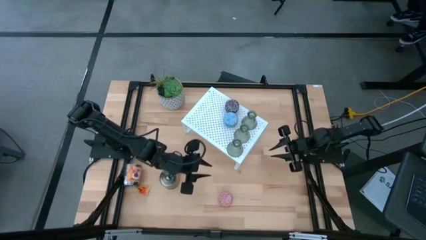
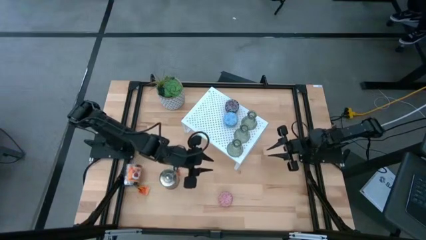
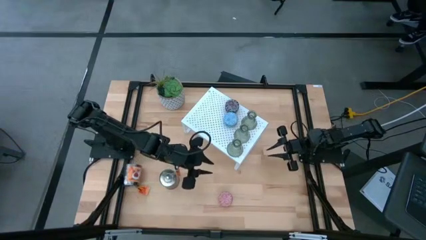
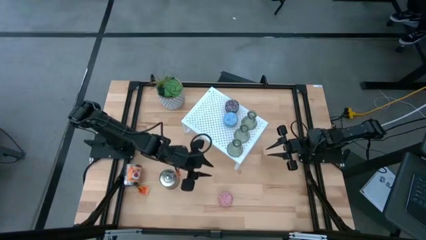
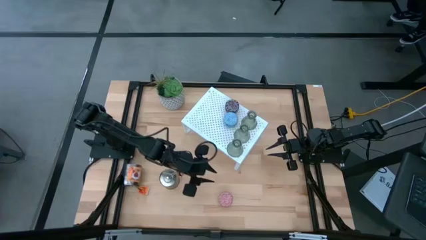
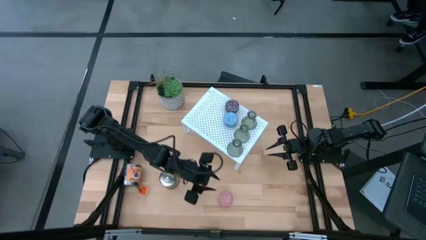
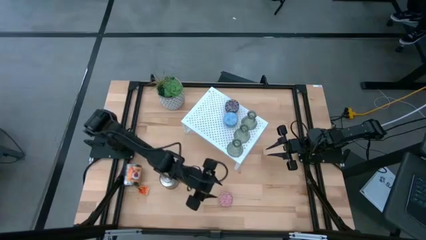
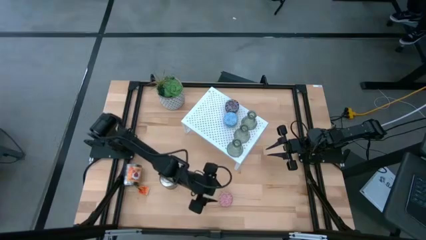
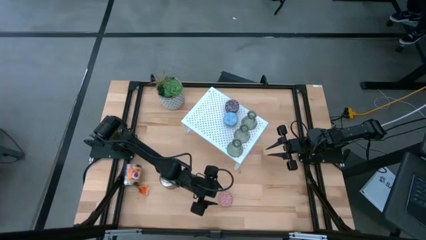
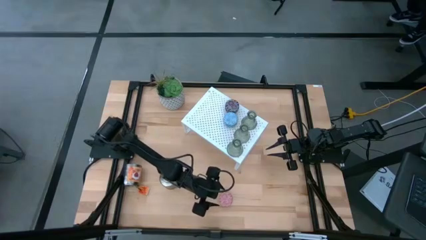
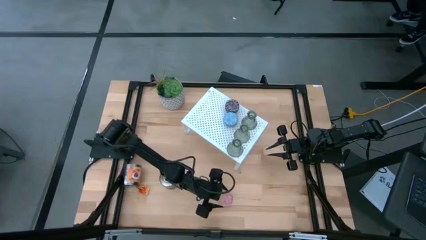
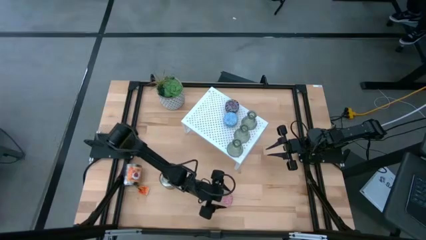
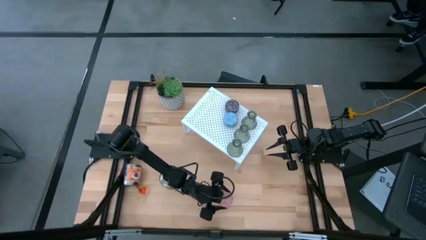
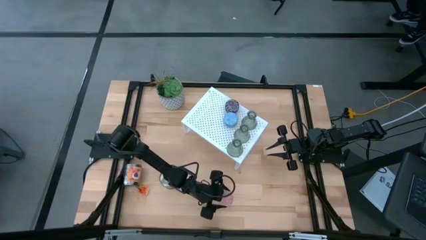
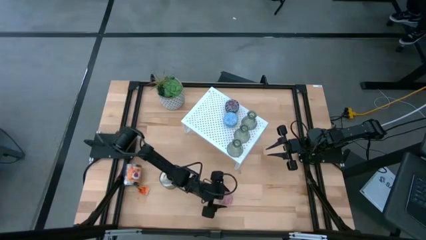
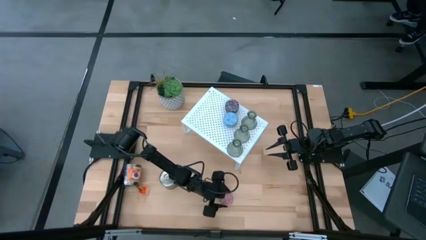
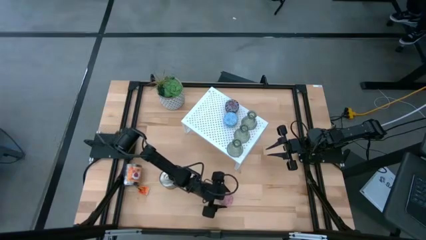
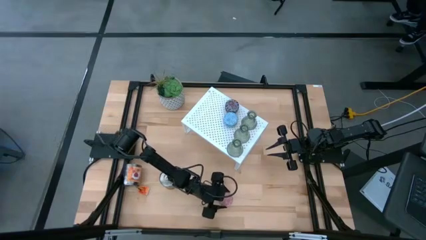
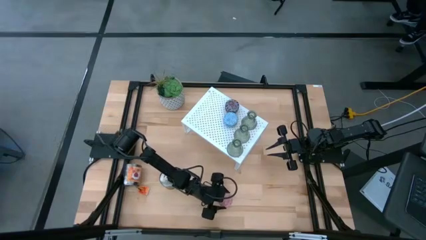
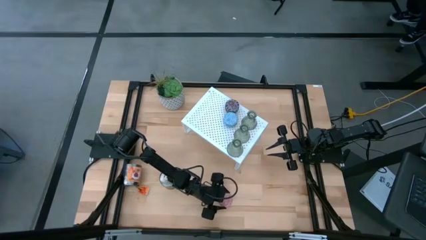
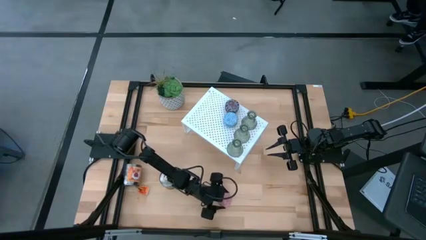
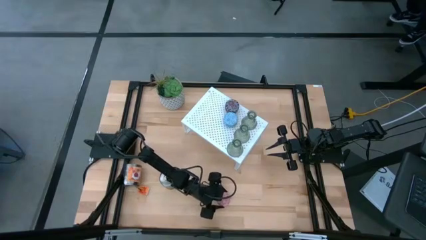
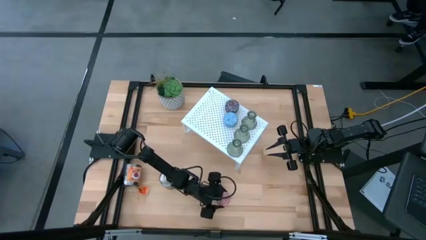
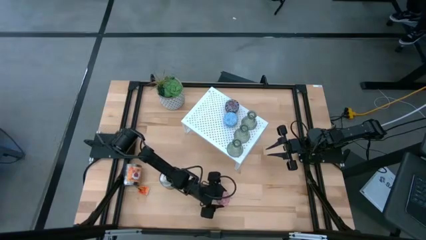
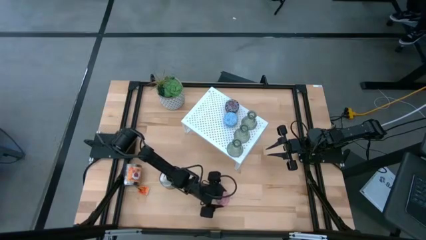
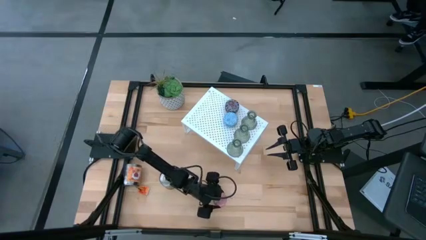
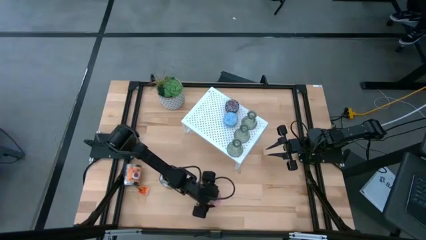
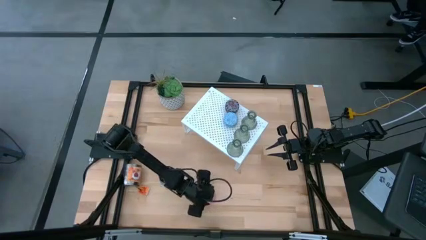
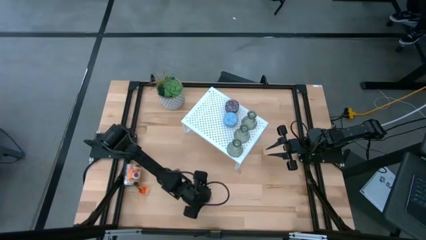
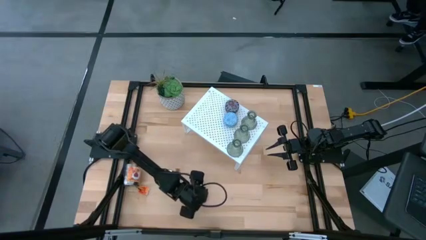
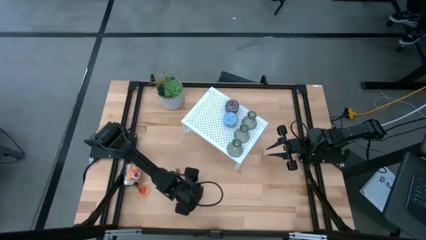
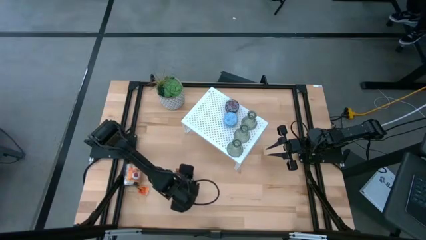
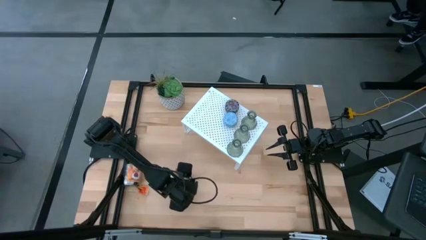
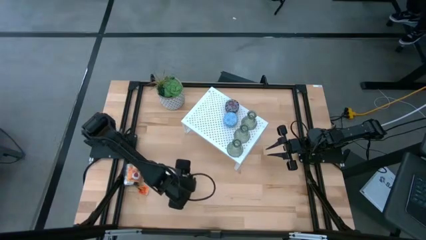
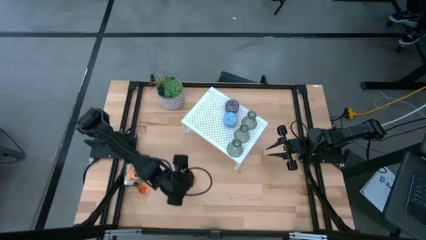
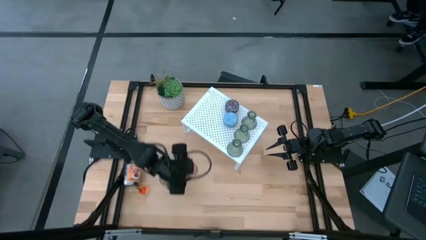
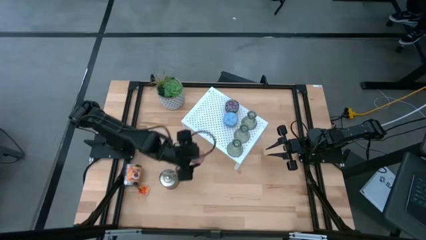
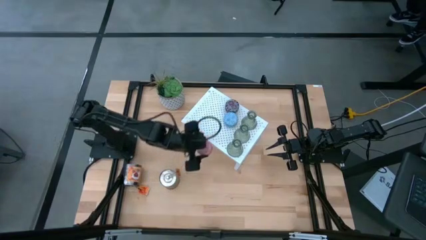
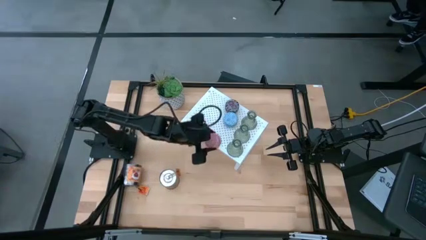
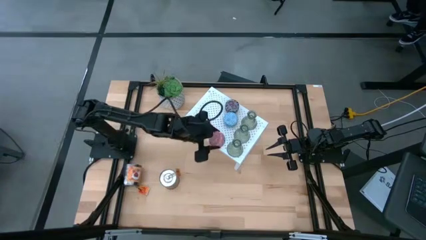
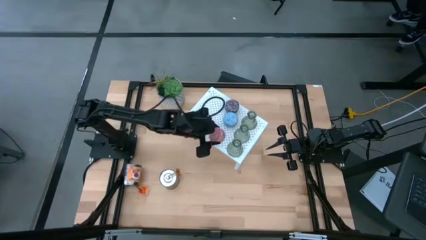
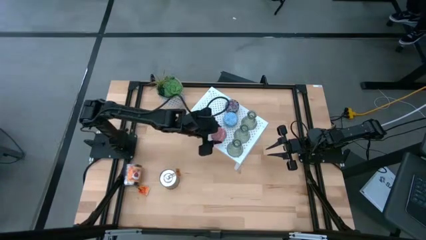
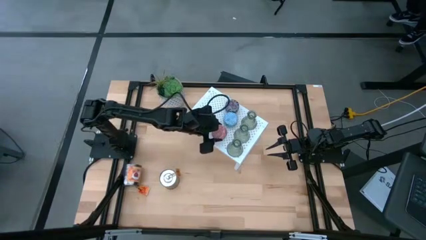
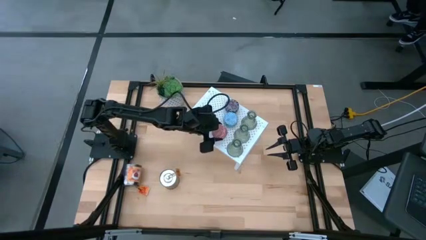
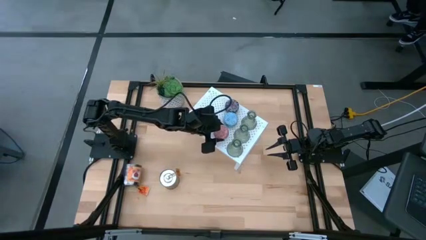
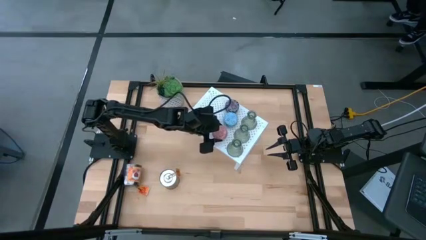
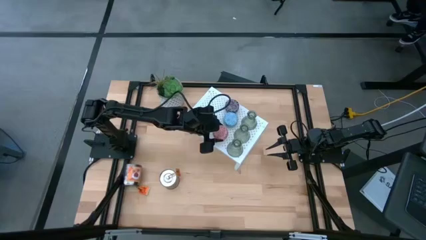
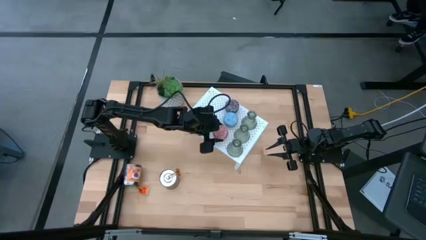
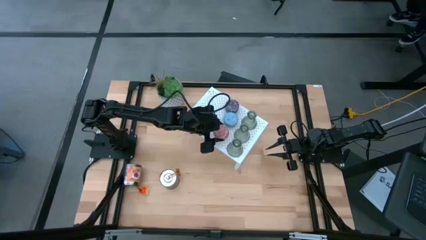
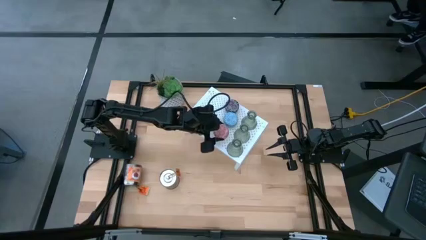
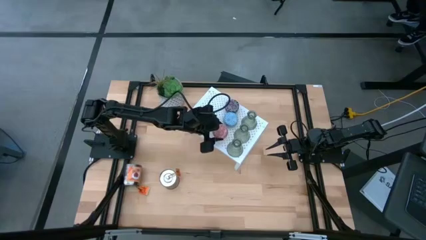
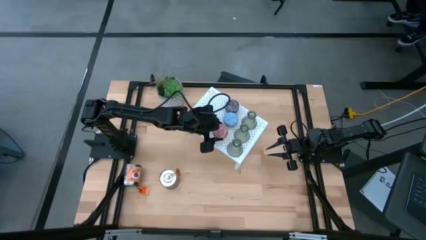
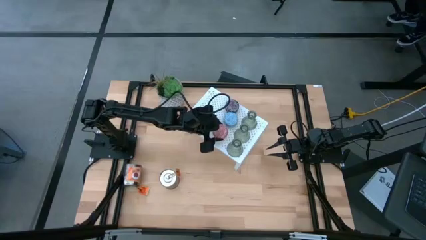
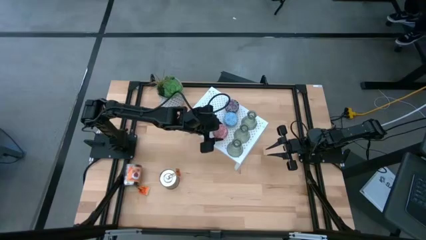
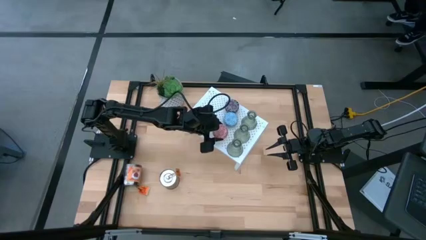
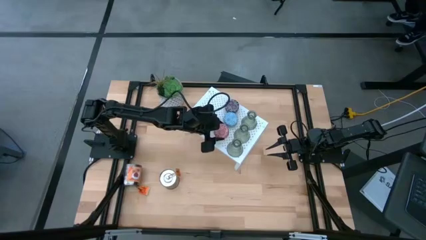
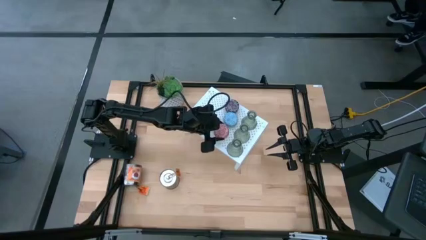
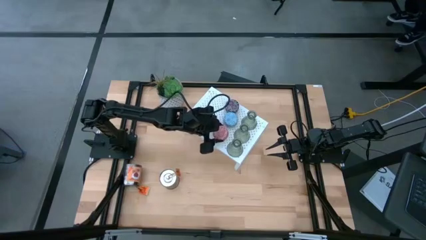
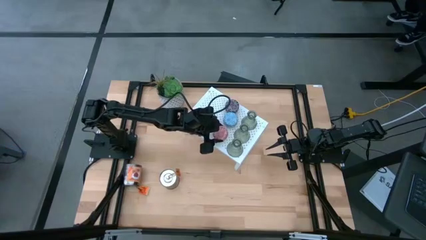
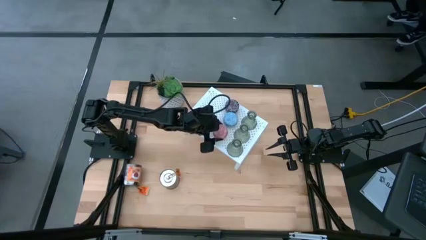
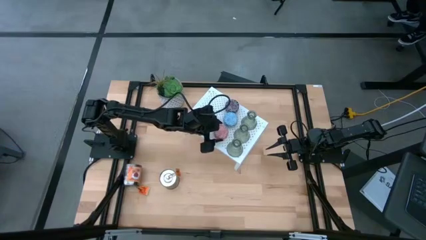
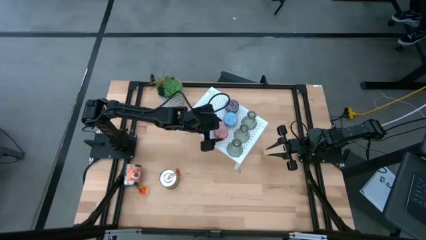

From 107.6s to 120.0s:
Task: Pick & Place candle stick holders
Put the pink patterned scented candle on the shelf aligned with the other blue patterned scented candle

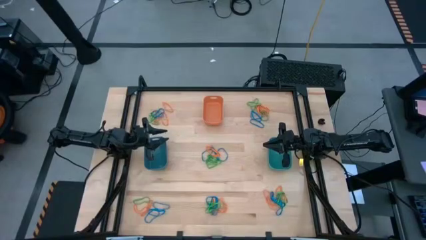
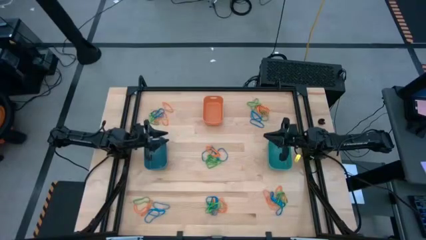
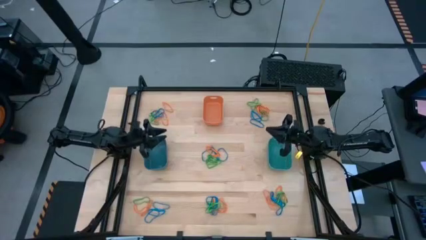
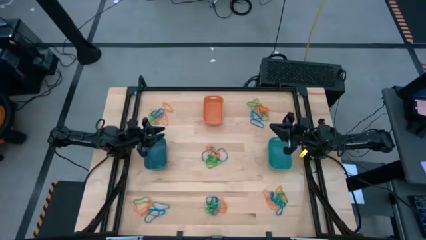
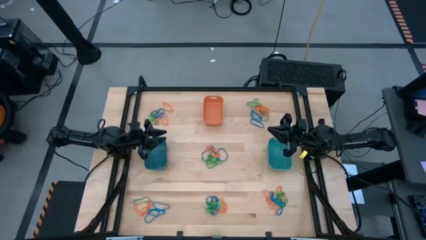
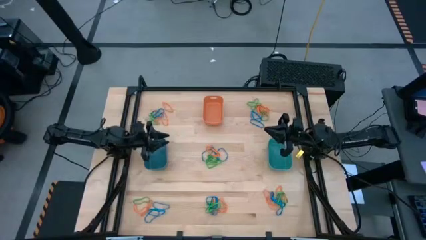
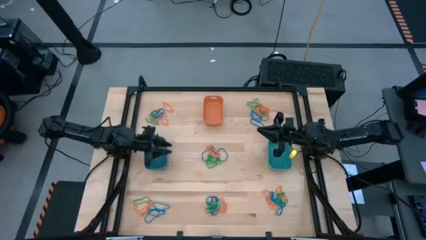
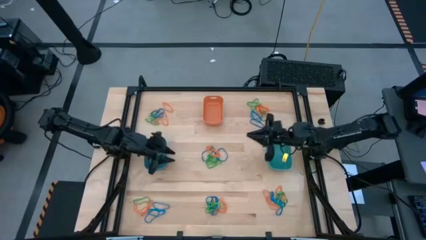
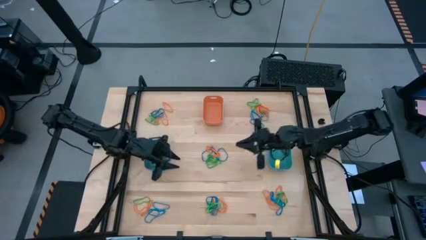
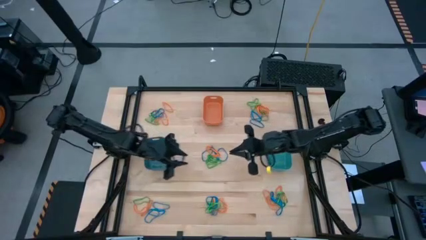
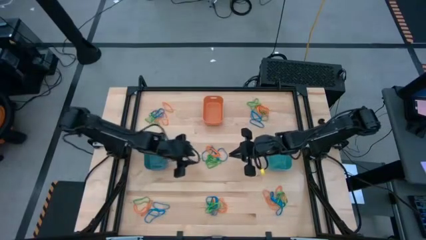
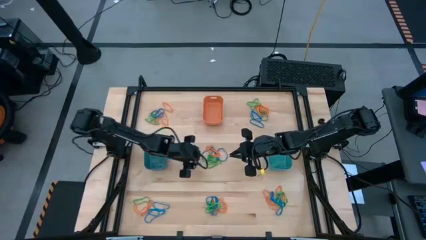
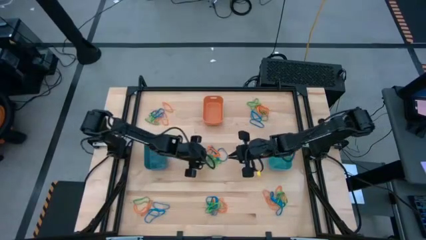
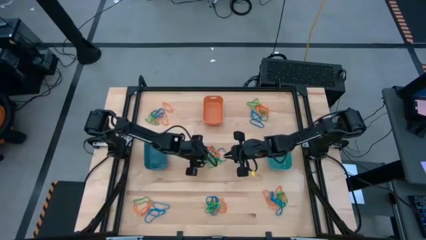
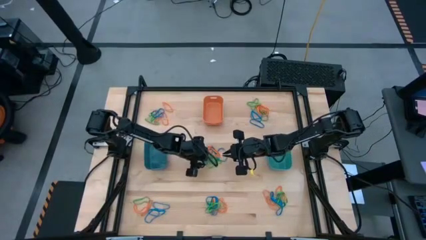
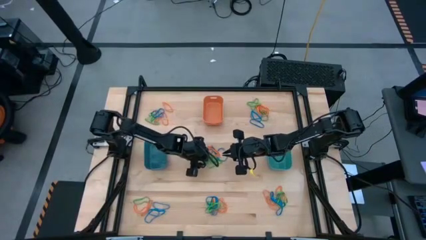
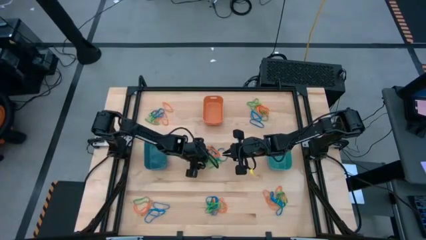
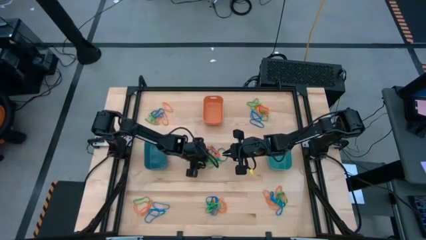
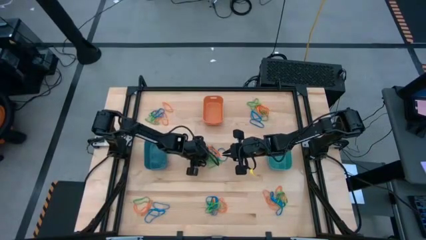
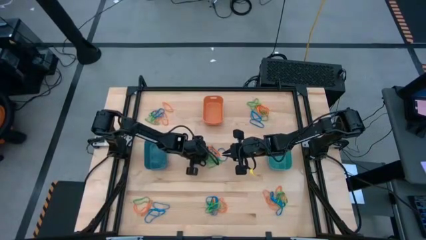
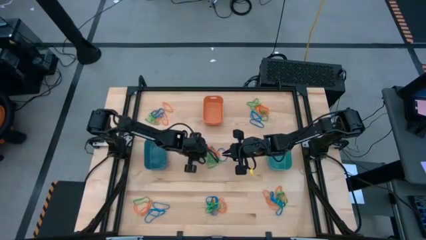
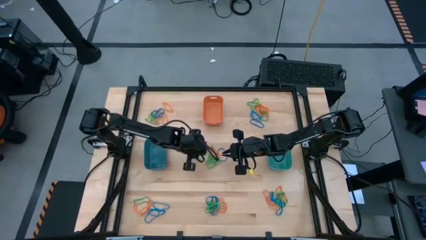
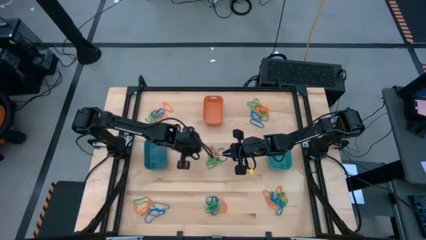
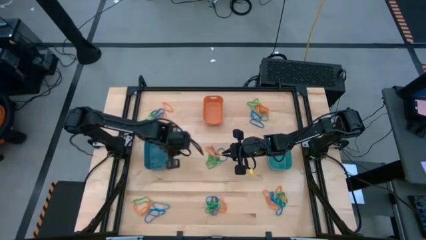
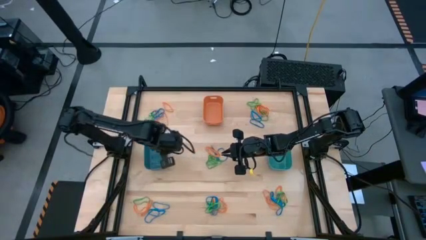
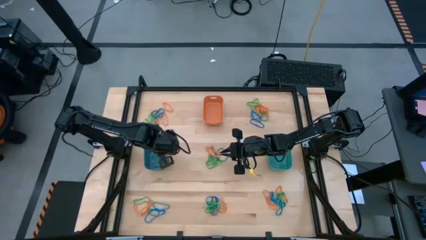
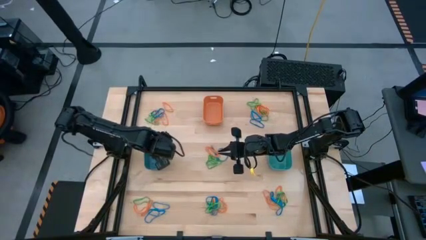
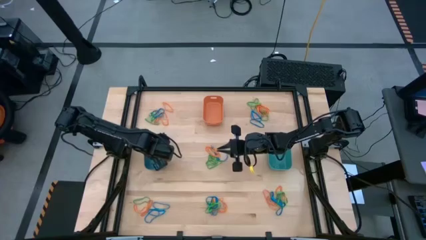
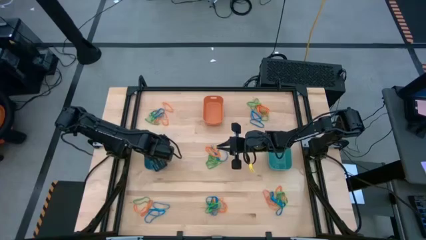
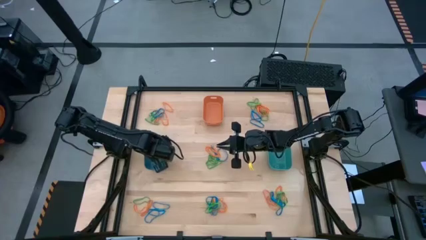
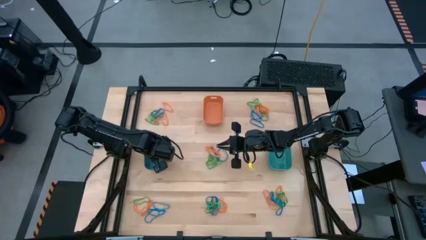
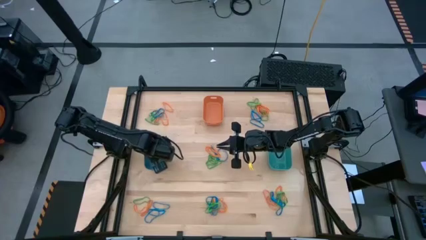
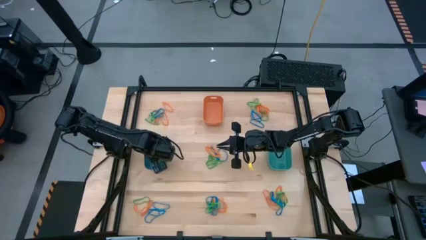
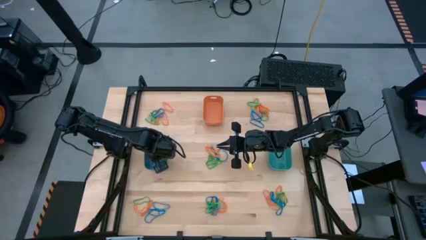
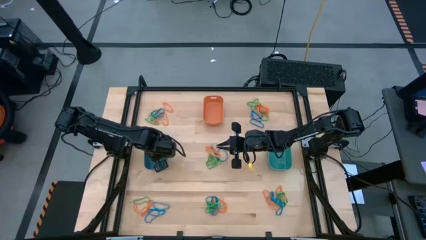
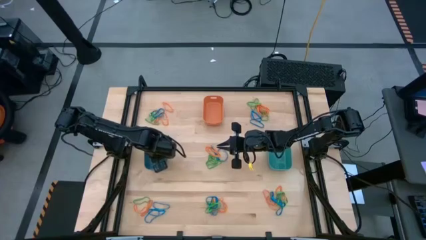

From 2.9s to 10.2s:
Task: Sort rubber bands into baskets
Put the blue rubber band into the blue bin
